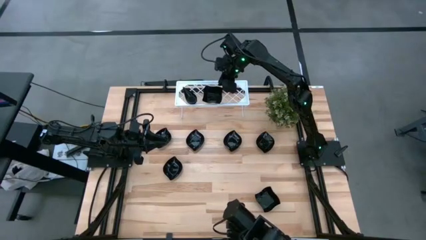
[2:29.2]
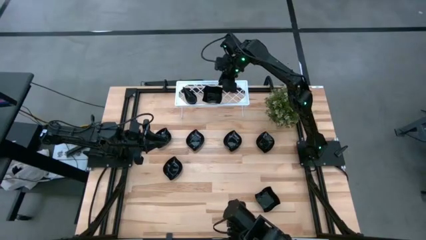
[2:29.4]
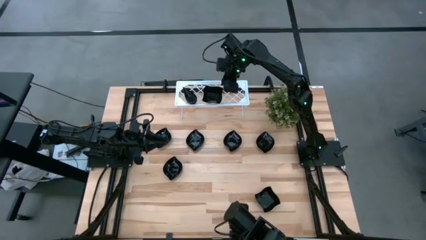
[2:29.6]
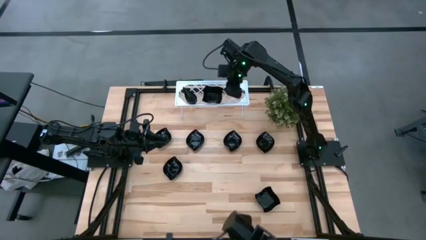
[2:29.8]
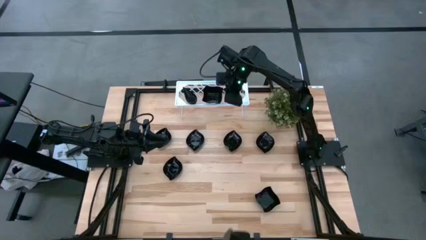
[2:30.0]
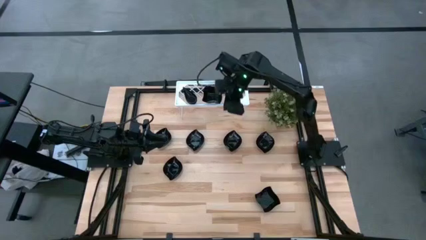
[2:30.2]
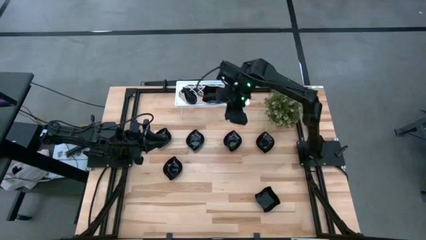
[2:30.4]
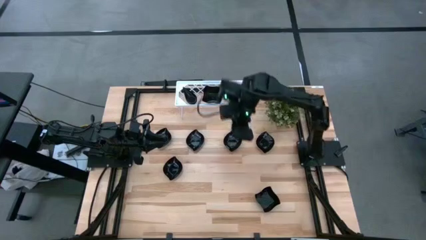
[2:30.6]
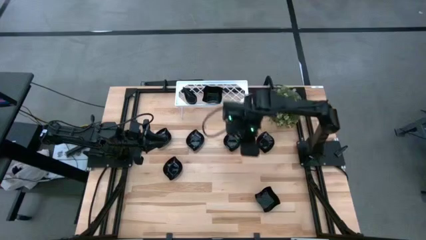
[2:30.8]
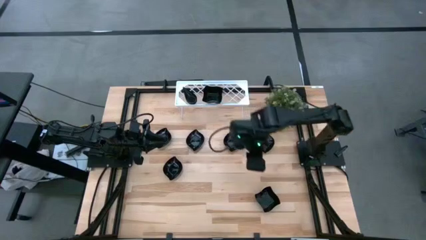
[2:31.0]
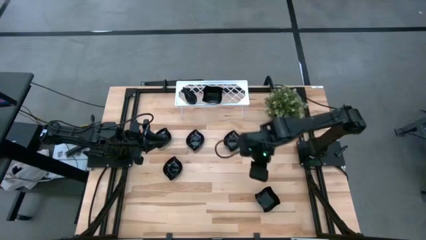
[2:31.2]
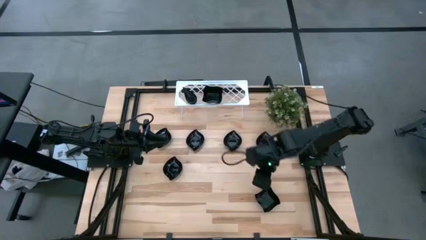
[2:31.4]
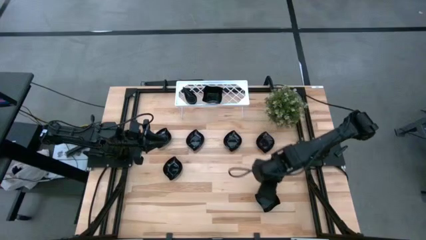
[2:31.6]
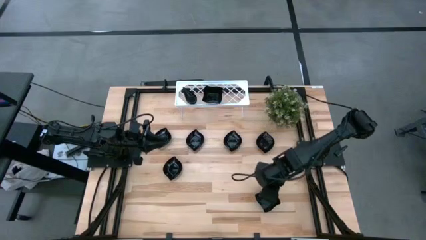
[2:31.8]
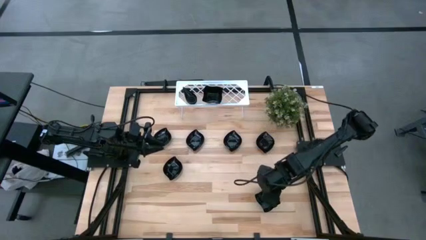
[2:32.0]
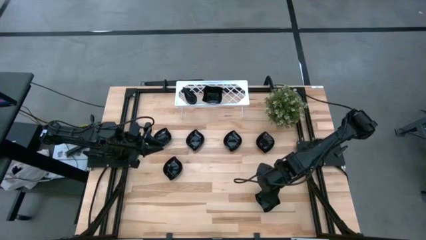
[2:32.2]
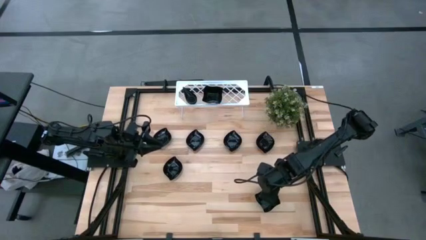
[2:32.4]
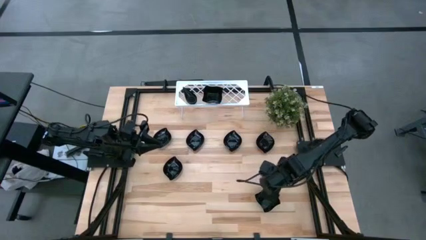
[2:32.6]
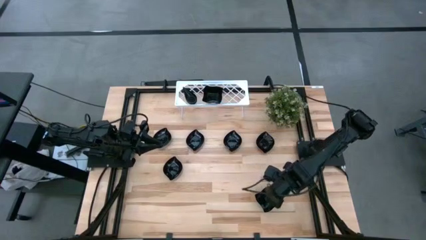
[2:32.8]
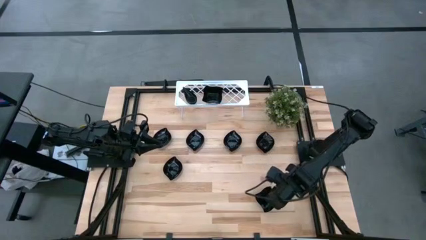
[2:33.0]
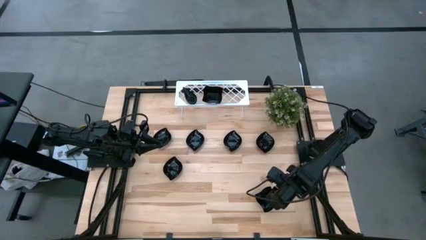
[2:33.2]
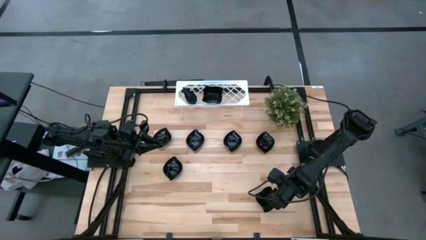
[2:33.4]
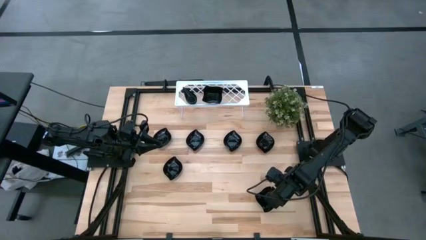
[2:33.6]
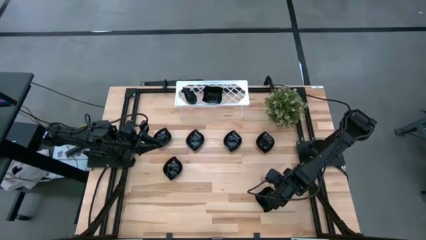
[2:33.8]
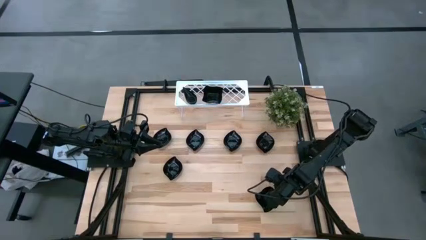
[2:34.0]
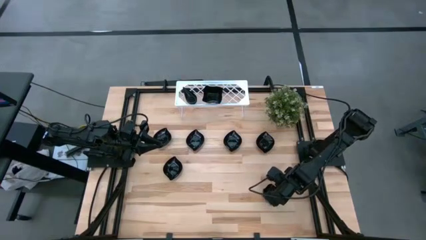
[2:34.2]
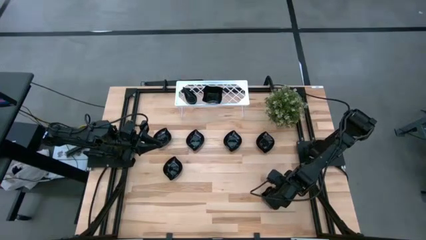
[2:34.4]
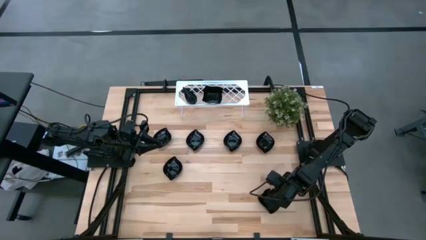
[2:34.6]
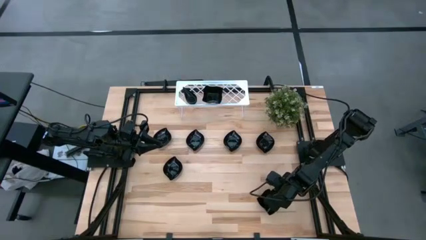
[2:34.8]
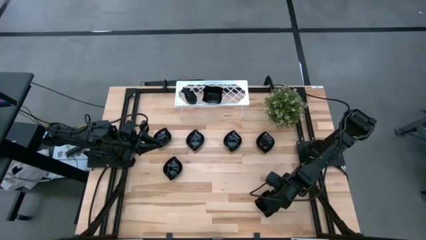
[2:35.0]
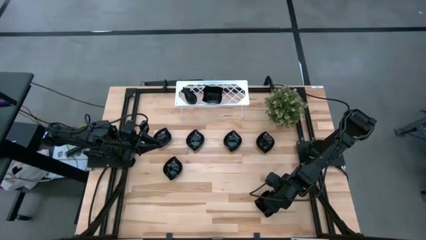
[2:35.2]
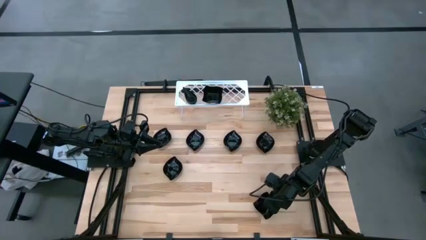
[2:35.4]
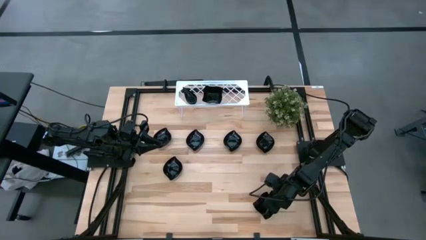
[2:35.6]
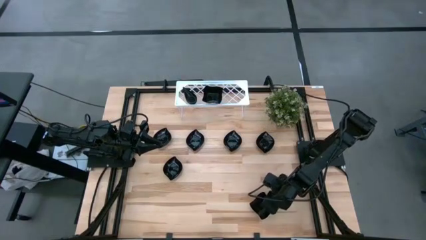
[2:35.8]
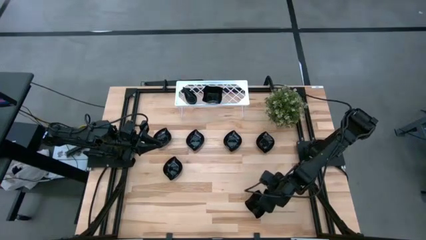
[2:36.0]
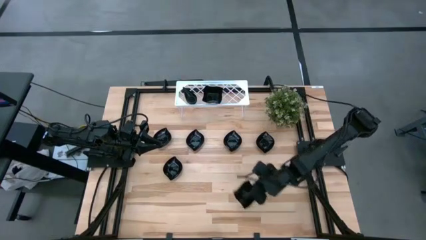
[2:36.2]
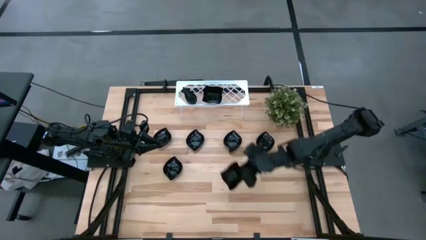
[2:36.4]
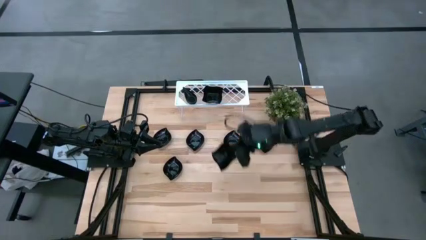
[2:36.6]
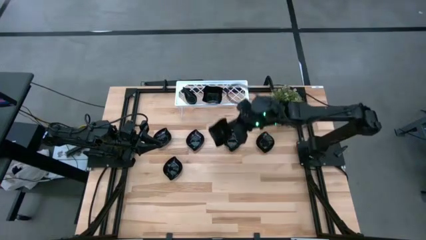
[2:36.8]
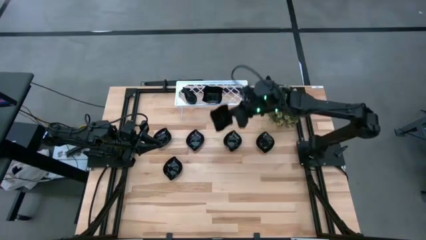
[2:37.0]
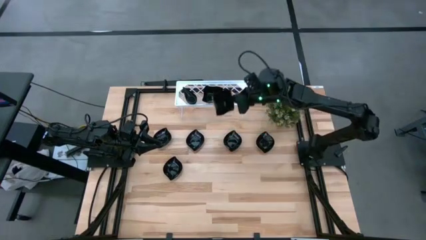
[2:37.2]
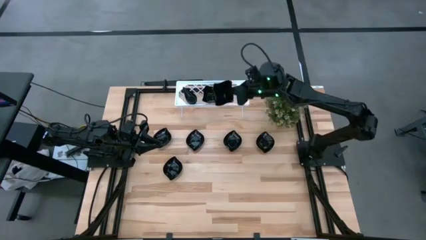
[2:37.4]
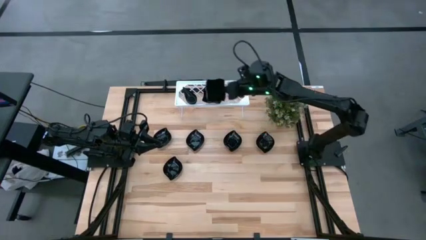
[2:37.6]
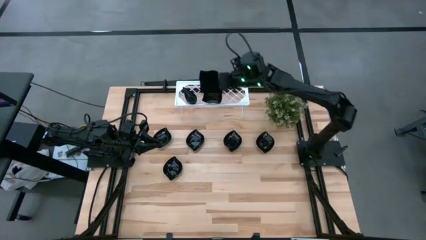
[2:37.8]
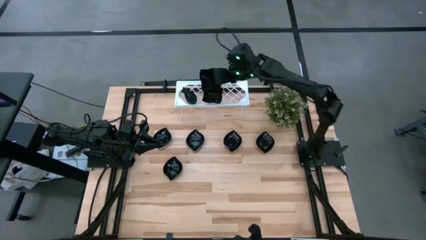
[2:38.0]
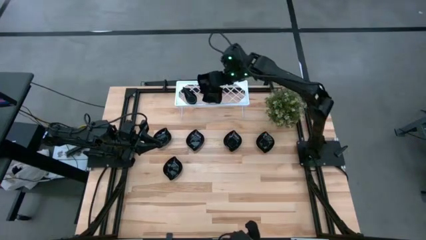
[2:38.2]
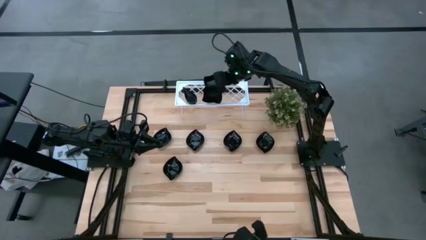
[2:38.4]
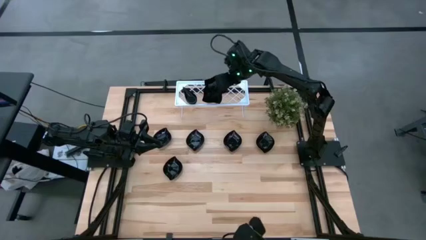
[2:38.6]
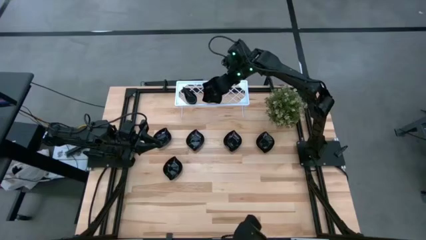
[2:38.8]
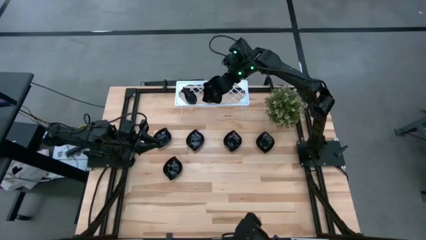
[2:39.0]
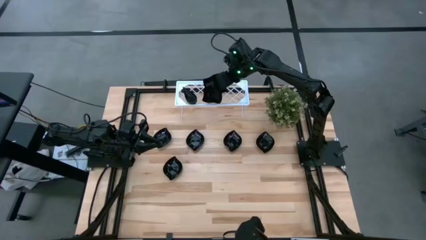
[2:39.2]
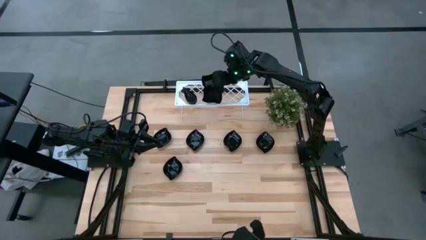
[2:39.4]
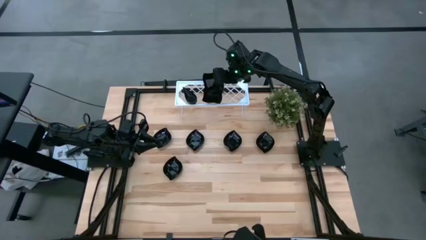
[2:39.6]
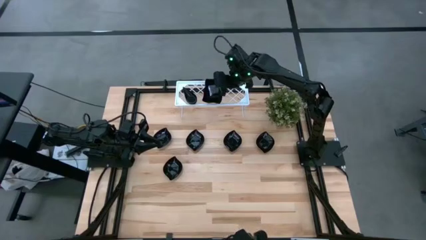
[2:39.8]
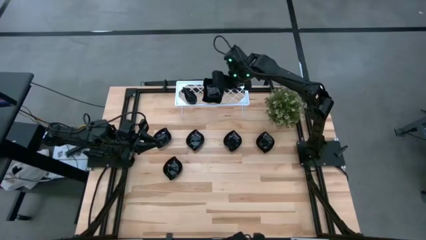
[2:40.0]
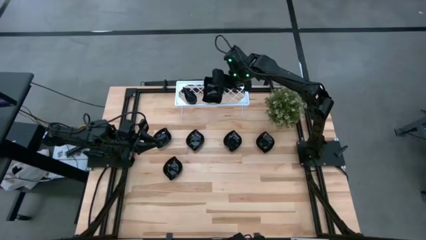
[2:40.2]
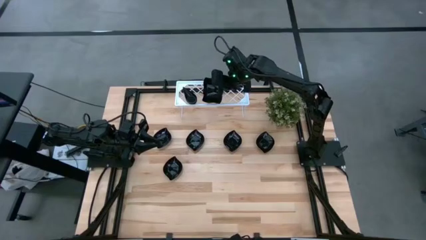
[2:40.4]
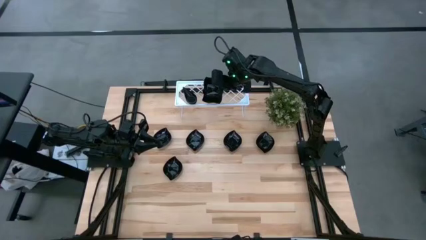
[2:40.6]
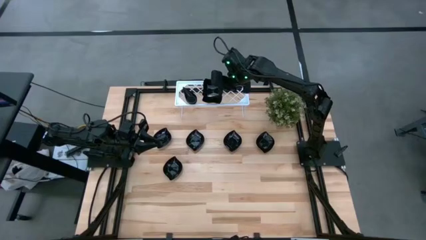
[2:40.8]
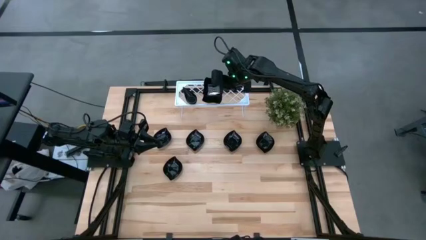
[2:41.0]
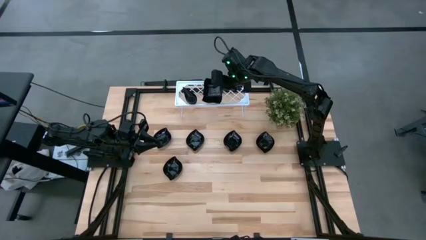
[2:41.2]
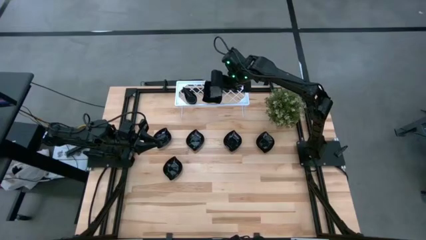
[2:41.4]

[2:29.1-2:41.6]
Task: Pick & Place Mini shaped plates
Stack the black distorted square plate on top of the black distorted square plates on the shelf

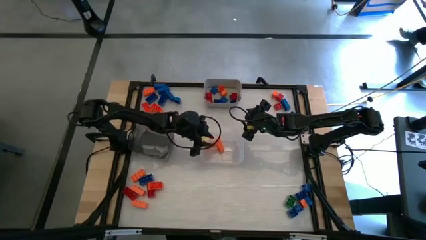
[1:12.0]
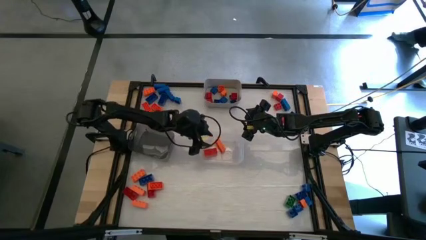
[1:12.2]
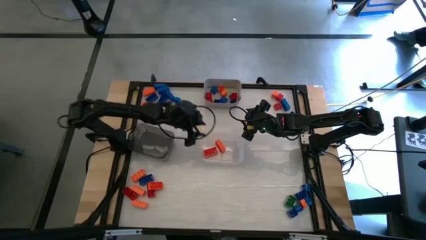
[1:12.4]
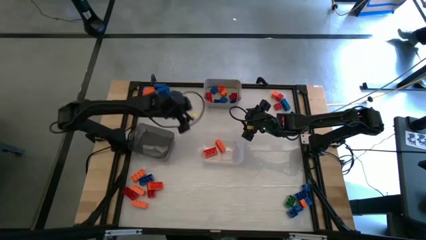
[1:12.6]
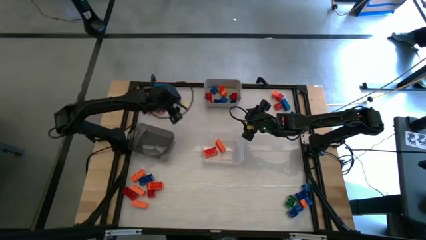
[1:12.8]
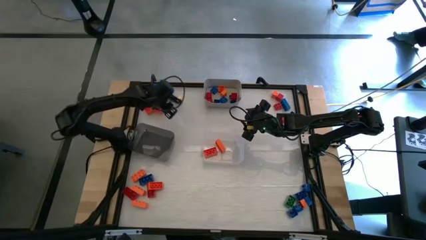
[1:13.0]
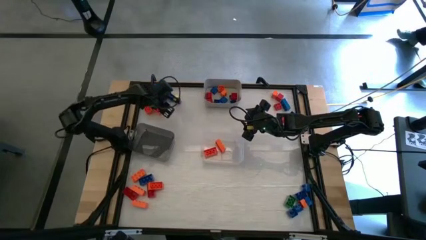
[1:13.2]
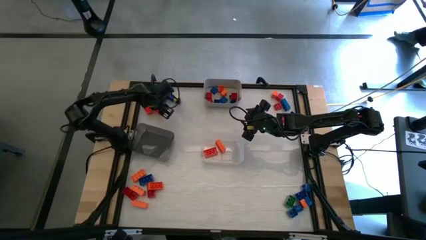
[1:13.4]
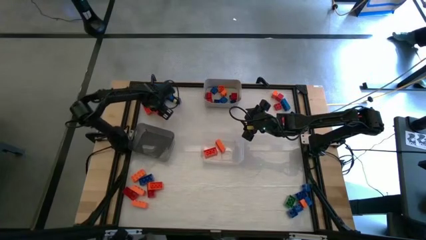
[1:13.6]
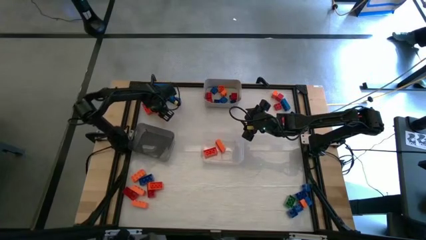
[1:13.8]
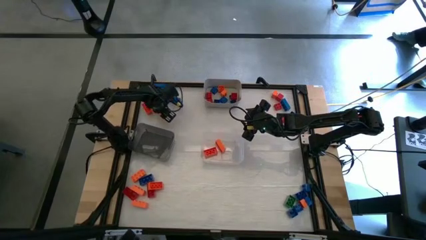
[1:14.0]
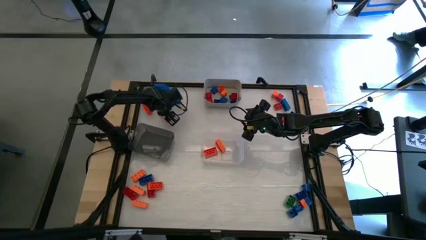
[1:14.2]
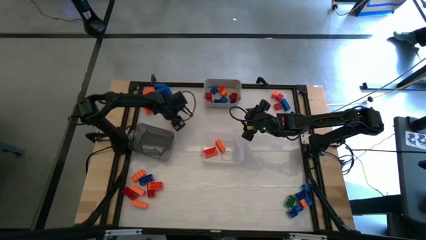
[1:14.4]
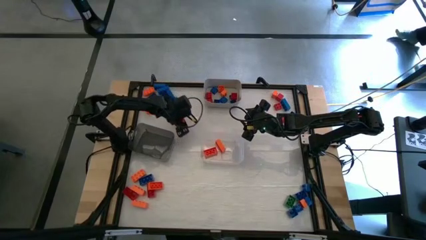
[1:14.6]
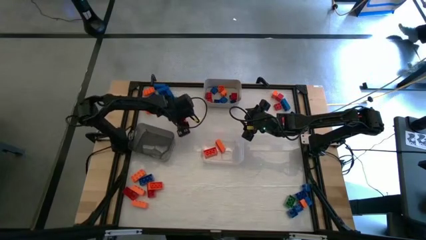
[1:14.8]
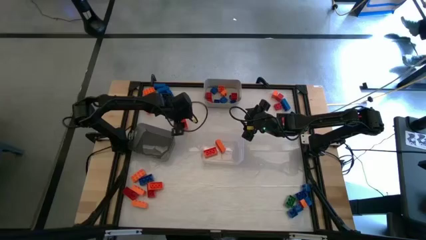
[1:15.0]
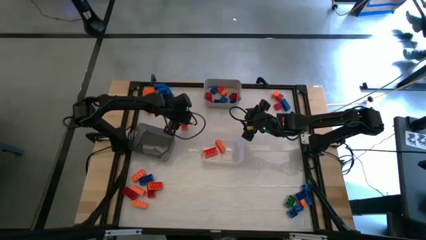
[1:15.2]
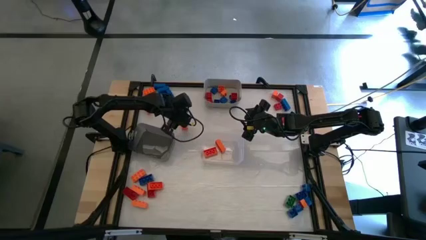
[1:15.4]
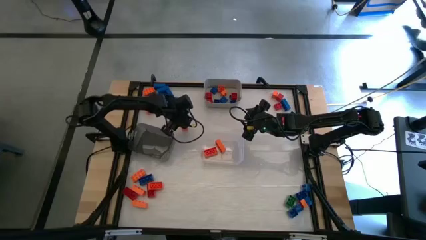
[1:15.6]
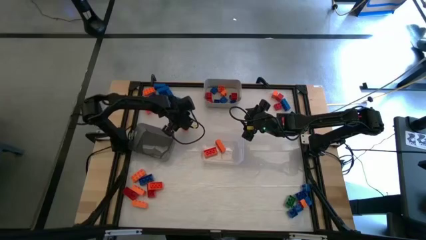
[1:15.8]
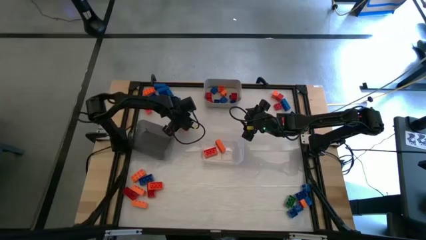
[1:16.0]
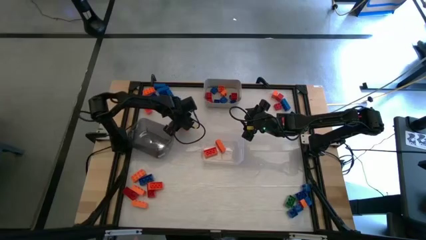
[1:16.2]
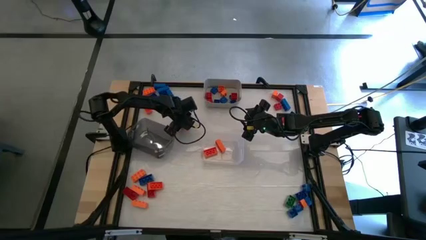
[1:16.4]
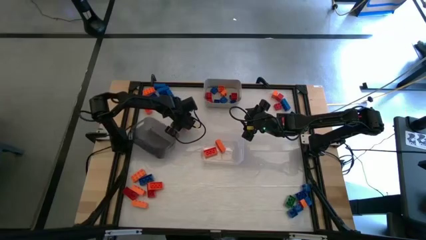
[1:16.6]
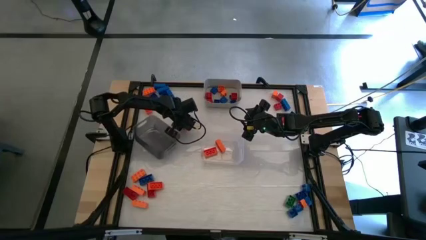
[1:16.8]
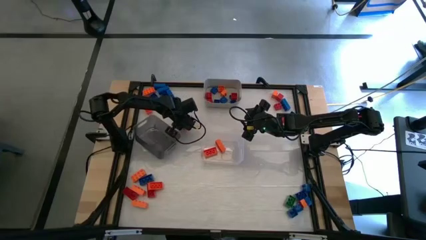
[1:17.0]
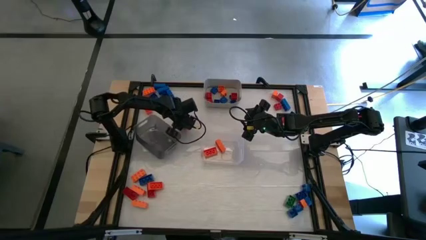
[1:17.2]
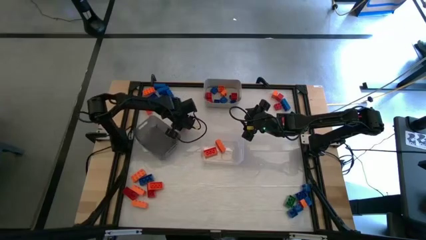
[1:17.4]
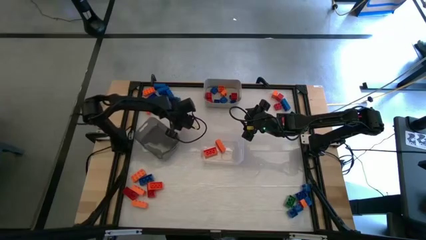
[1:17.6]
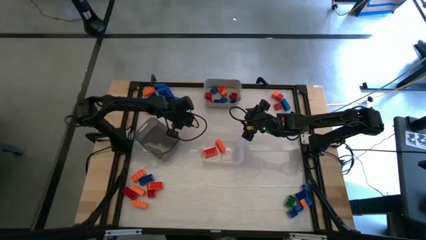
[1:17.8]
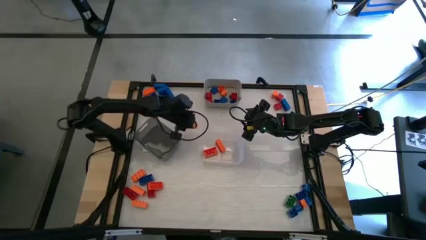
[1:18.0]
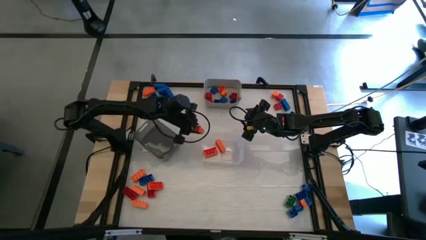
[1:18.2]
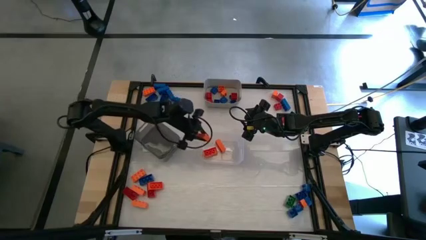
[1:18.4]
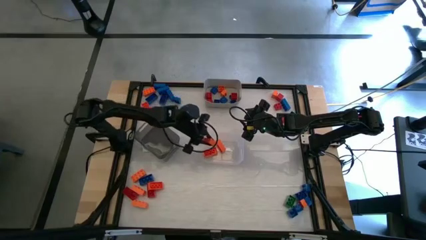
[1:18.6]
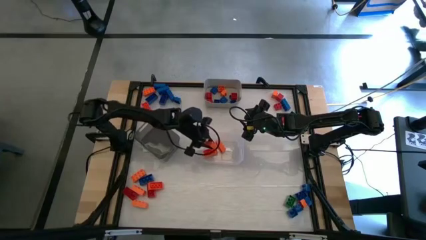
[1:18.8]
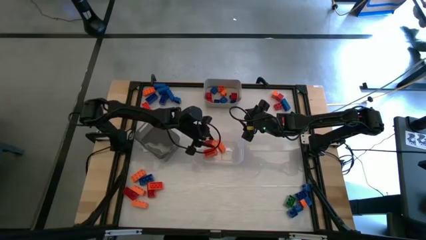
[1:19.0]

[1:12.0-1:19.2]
Task: Sort blocks by size
Put the big orange game piece into the transparent bin
